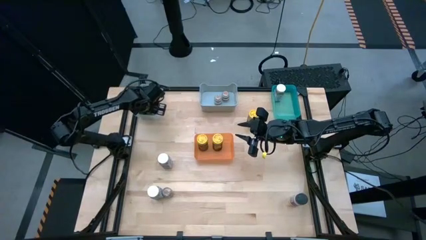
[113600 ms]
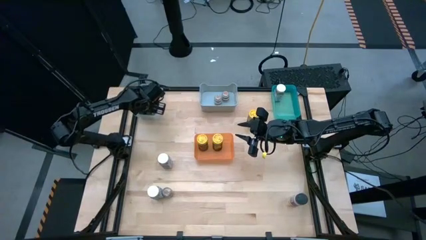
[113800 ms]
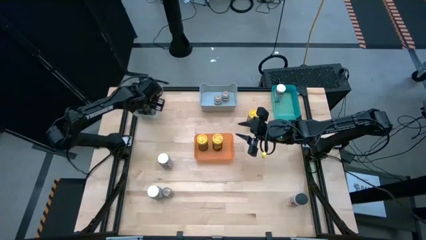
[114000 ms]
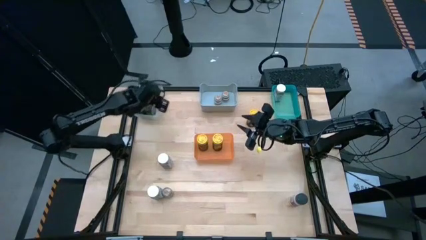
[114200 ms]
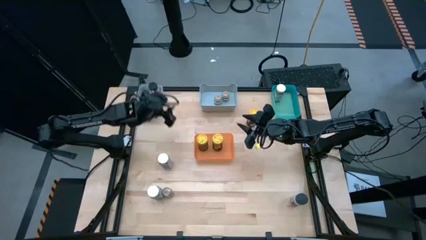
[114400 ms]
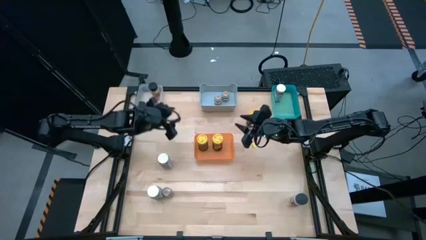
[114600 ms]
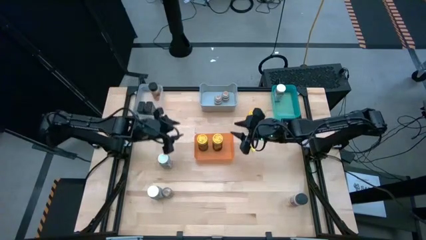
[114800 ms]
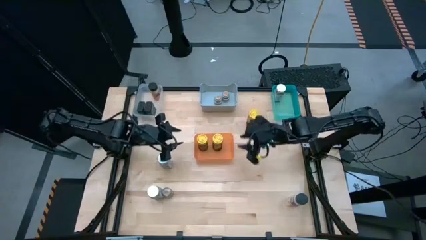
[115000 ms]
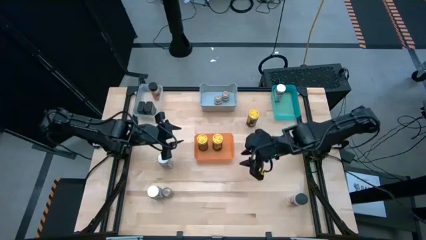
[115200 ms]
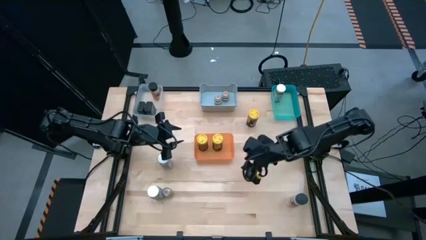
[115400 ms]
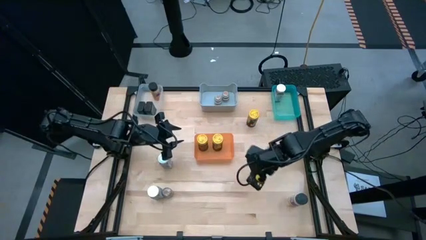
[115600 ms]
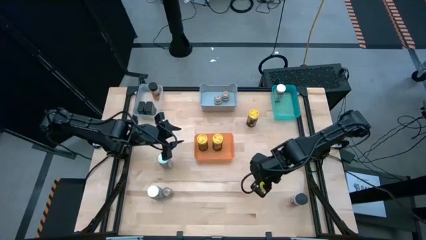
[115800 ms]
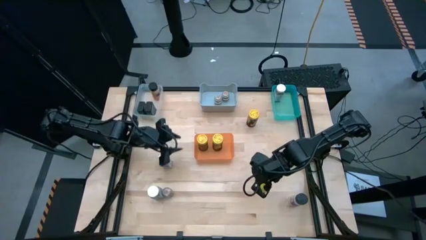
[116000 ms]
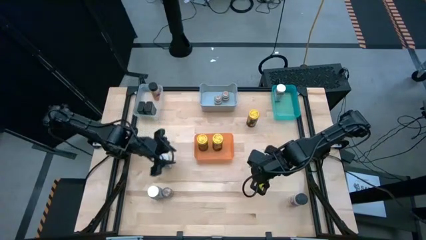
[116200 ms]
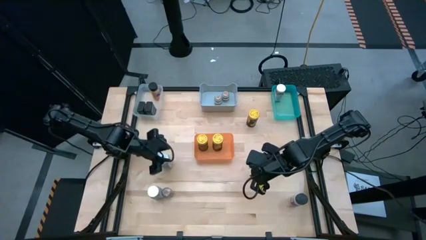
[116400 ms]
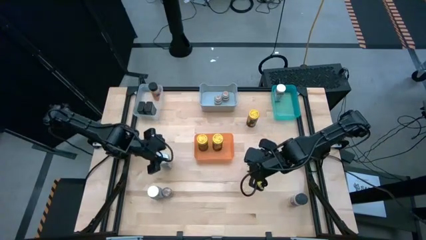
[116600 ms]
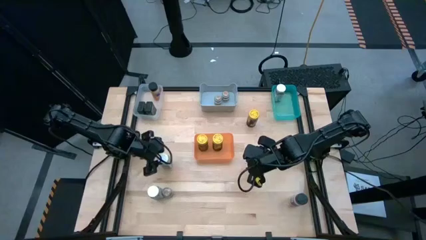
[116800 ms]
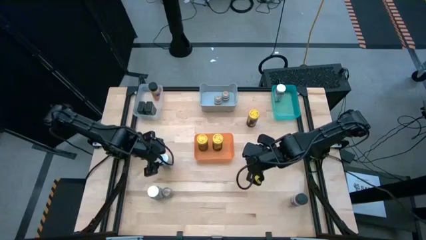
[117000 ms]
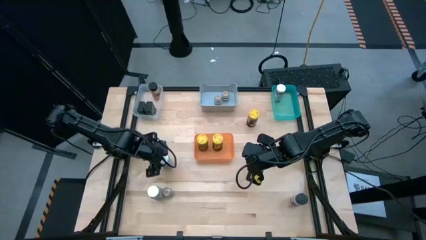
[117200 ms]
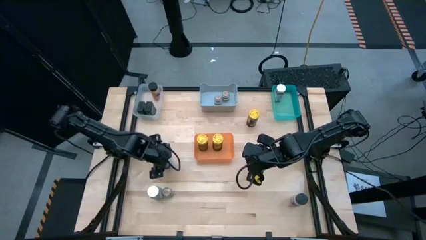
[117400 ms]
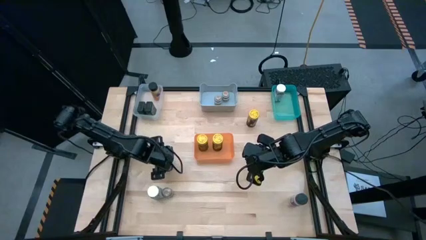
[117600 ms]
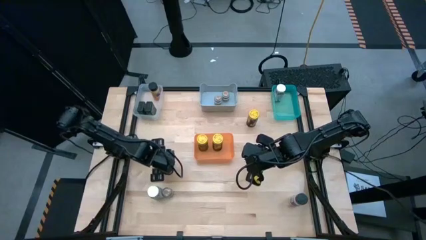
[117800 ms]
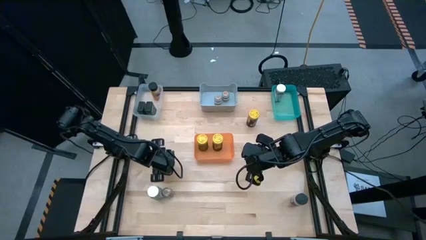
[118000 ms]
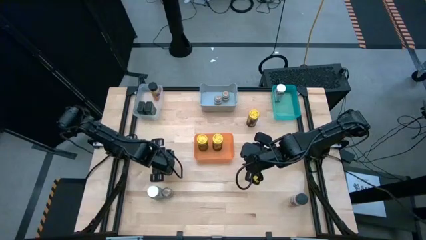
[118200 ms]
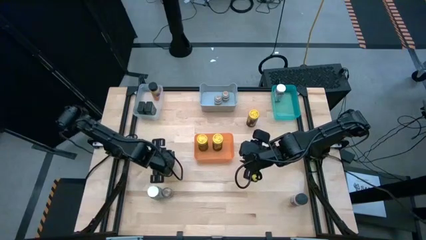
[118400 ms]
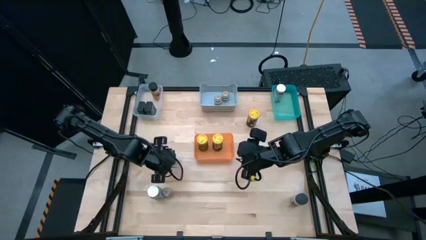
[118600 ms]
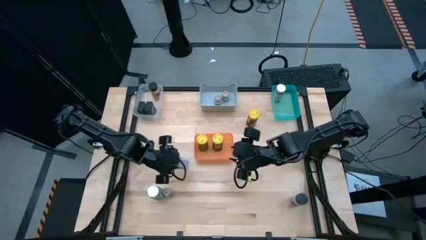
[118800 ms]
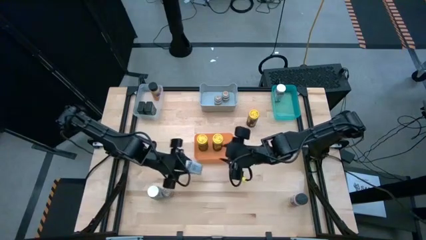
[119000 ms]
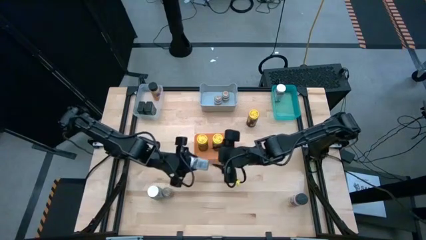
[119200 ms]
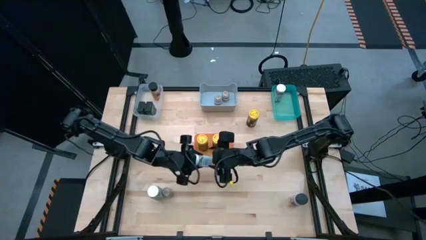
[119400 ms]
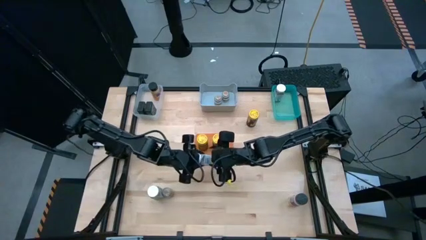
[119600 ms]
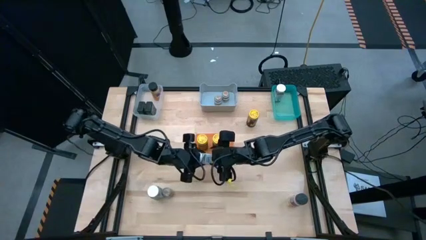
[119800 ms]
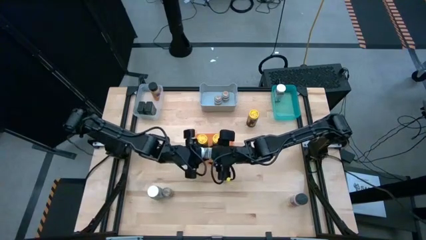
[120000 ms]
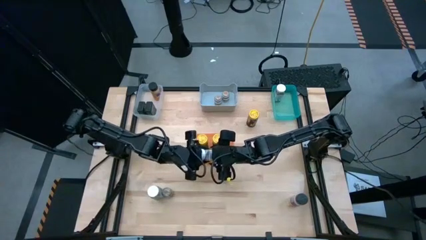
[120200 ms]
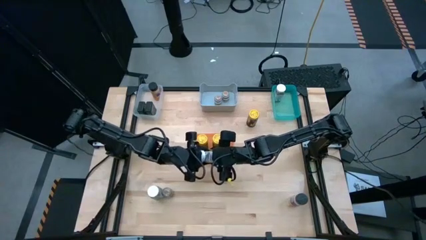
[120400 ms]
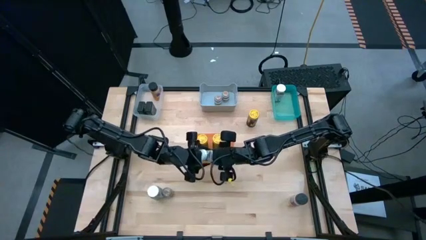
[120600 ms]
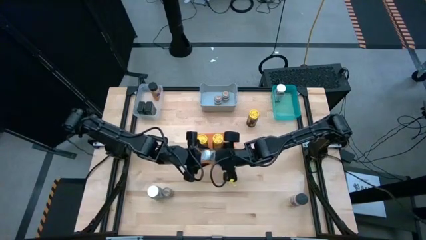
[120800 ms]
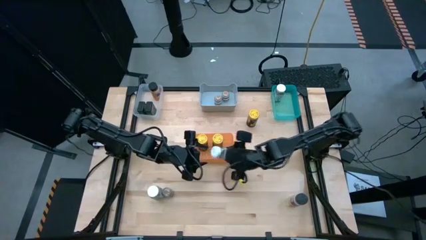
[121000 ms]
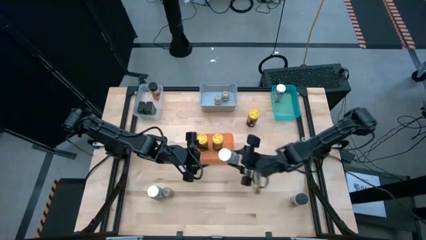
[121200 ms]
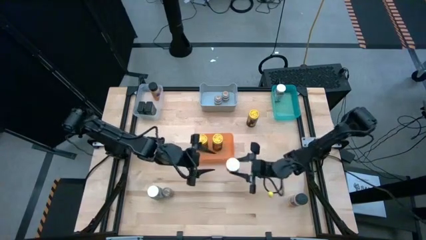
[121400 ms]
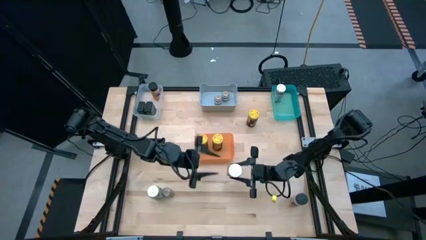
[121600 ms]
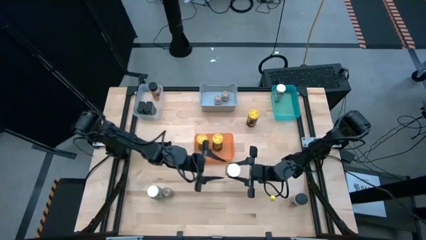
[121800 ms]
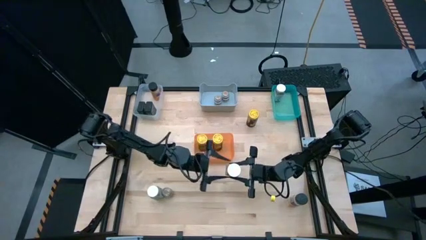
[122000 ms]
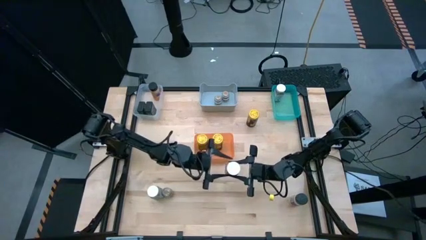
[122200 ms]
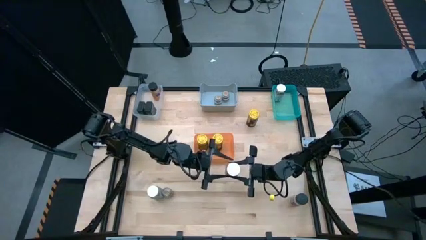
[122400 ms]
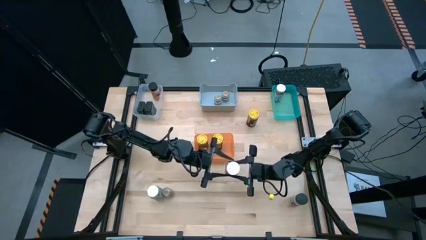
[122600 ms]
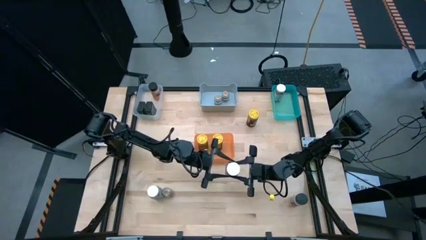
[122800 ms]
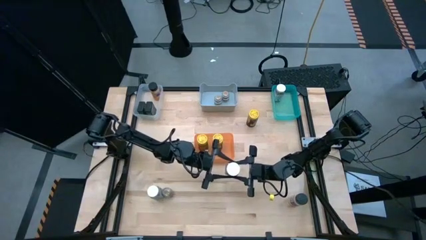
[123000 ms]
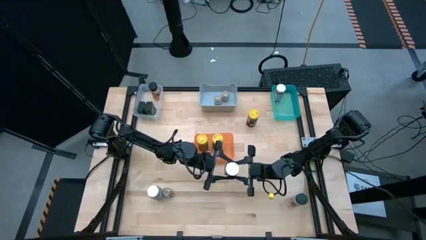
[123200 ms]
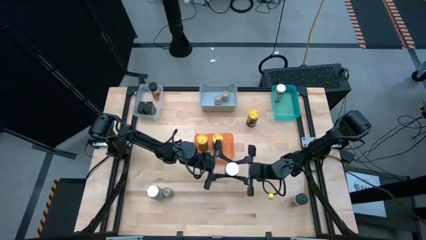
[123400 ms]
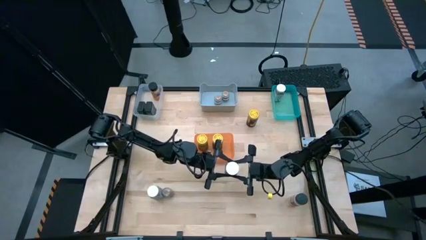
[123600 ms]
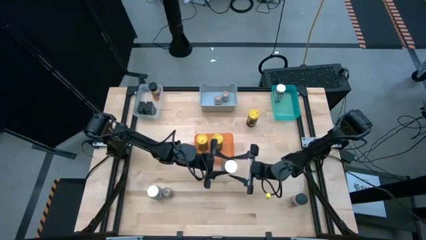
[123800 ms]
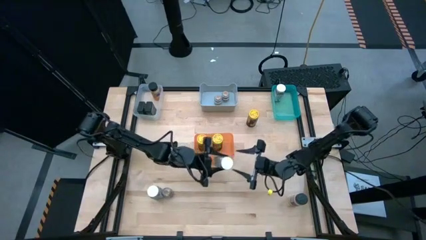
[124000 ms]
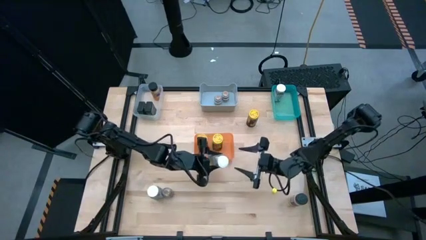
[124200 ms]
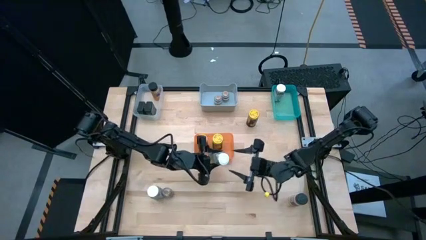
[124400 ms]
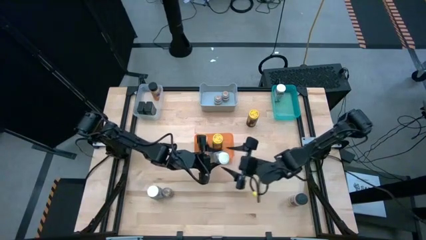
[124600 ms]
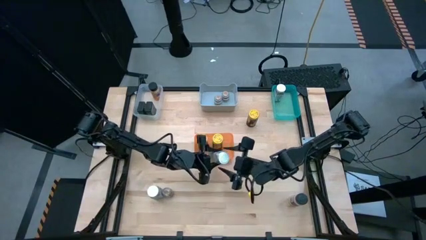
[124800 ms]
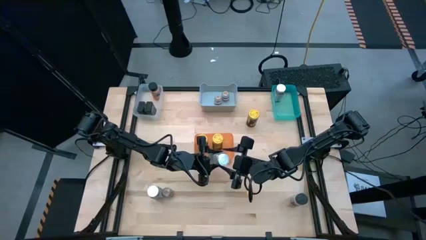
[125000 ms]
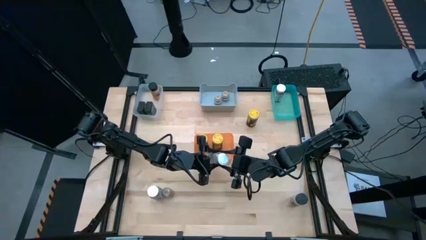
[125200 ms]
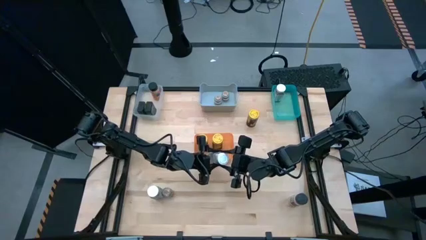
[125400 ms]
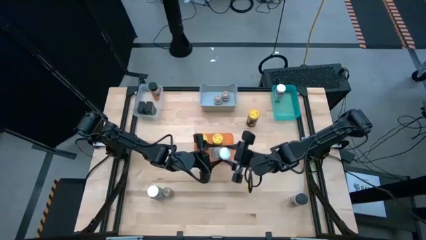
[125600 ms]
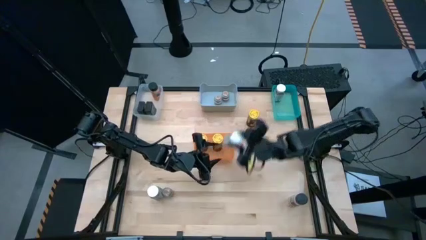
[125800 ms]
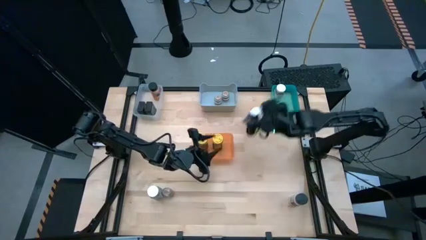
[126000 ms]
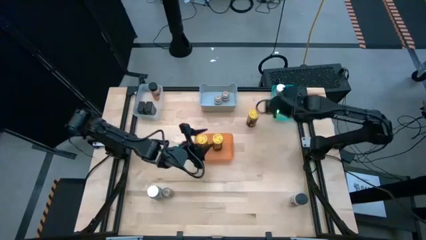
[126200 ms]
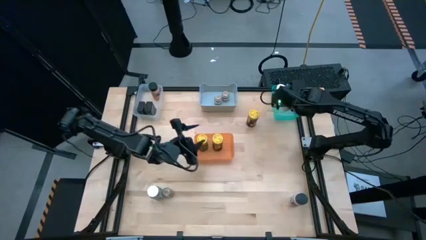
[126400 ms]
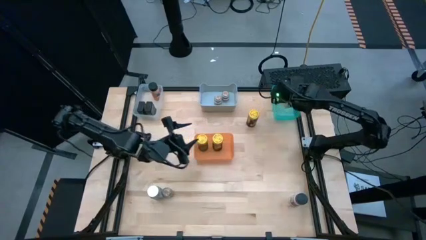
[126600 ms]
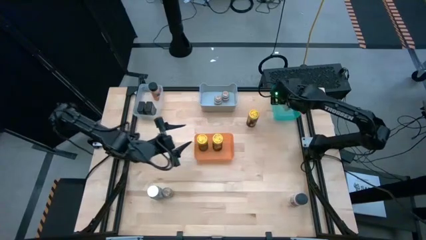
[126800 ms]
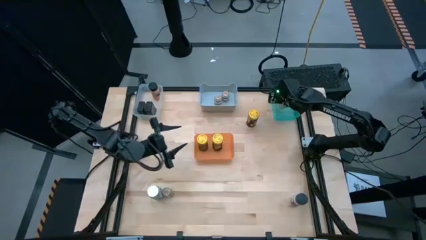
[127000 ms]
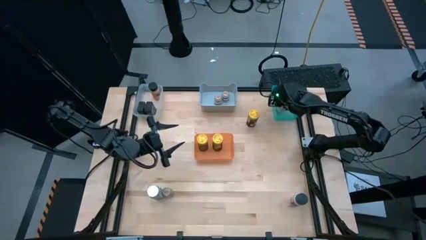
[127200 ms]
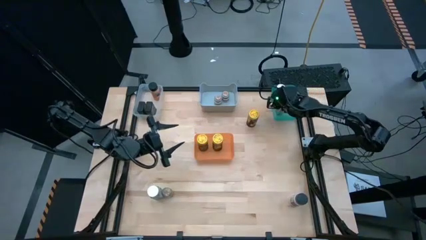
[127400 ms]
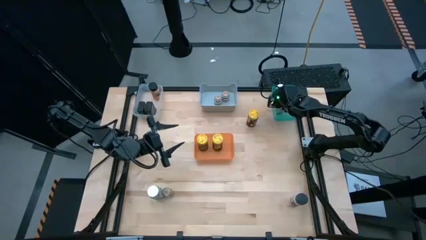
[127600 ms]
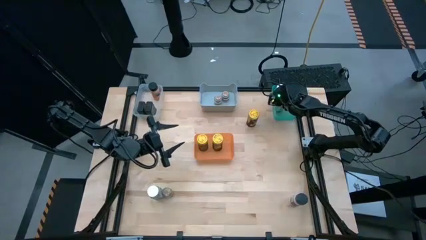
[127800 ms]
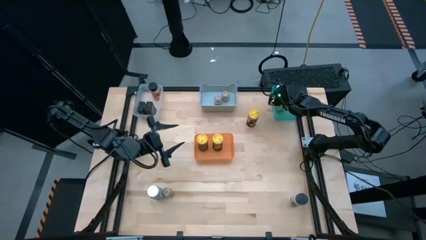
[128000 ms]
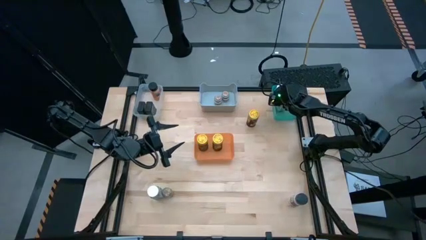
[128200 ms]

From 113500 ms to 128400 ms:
Task: Sort spices by type
Put the top white seasoning bottle into the green bin
